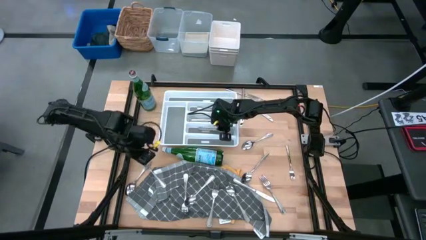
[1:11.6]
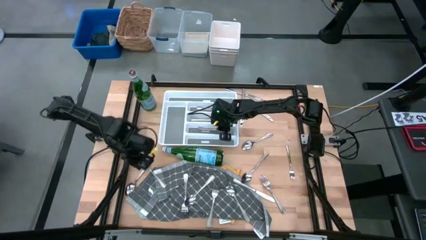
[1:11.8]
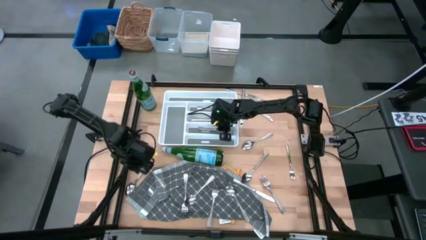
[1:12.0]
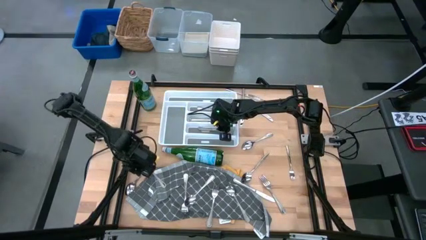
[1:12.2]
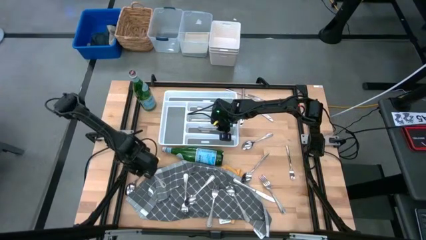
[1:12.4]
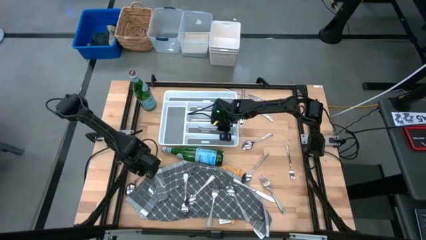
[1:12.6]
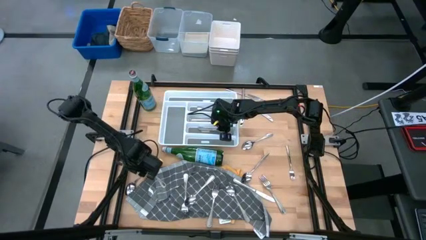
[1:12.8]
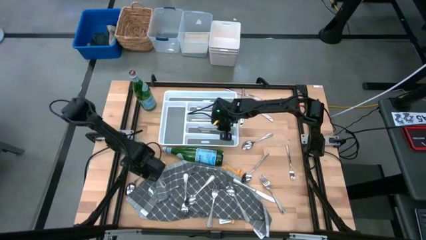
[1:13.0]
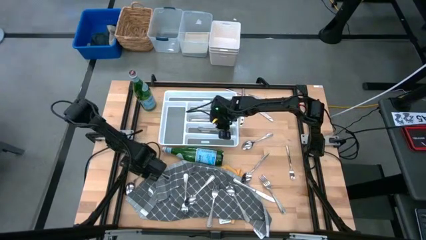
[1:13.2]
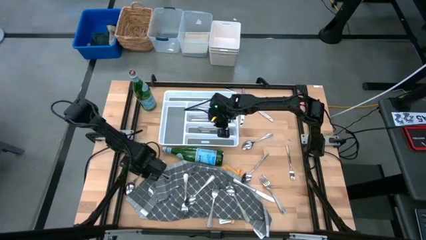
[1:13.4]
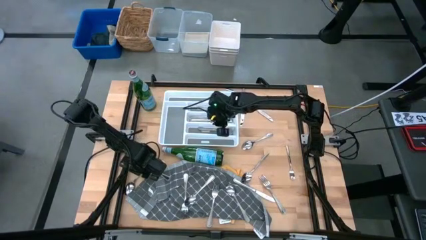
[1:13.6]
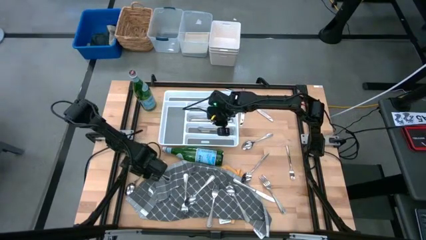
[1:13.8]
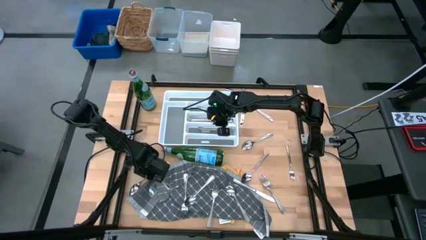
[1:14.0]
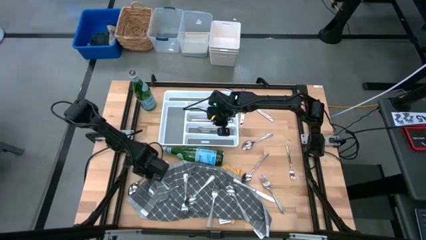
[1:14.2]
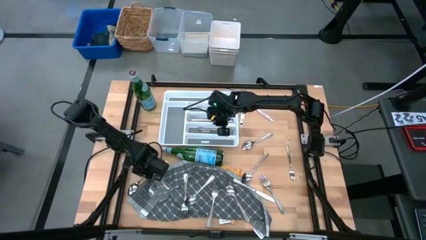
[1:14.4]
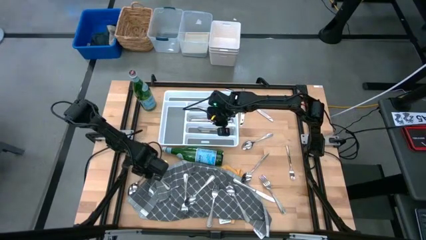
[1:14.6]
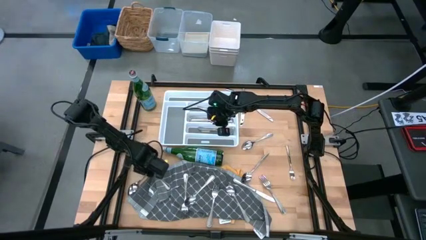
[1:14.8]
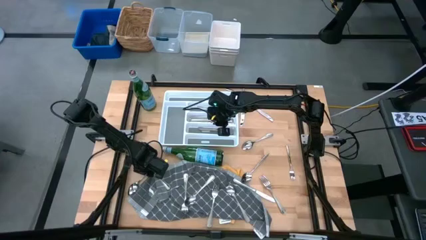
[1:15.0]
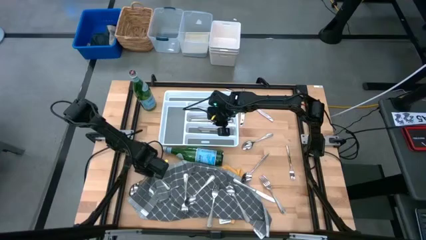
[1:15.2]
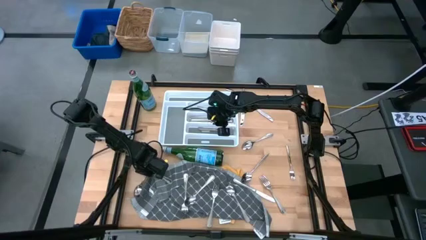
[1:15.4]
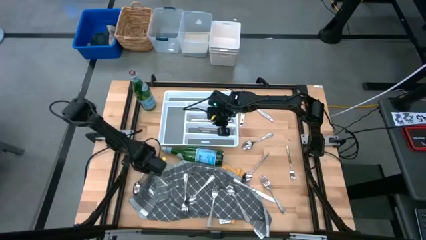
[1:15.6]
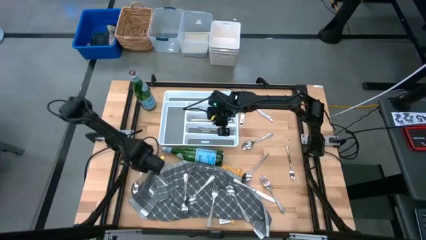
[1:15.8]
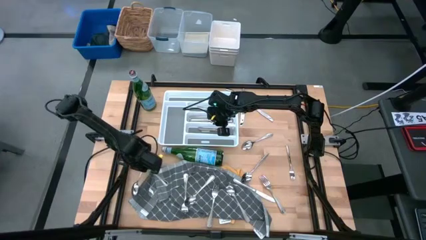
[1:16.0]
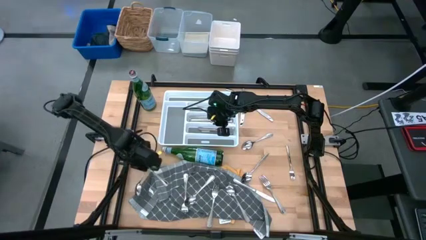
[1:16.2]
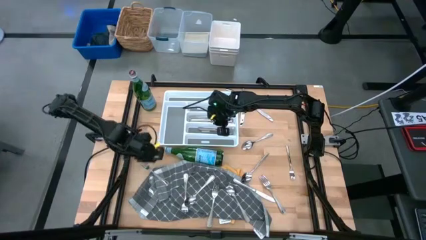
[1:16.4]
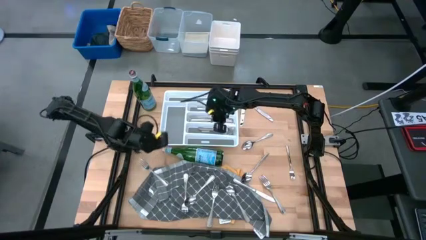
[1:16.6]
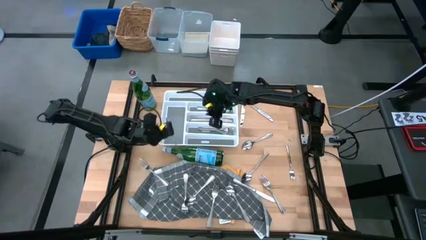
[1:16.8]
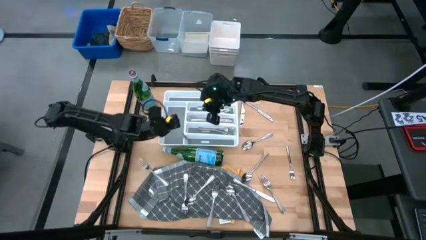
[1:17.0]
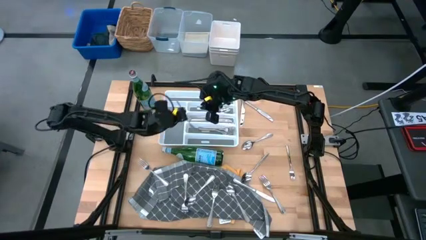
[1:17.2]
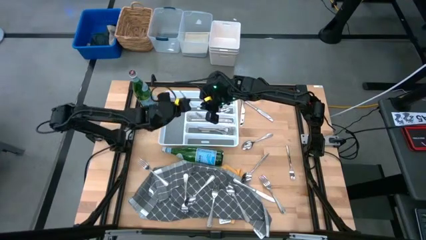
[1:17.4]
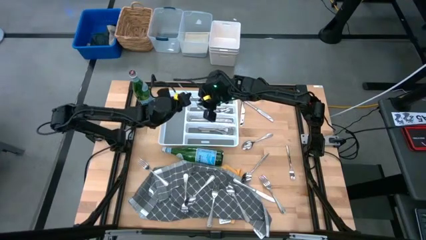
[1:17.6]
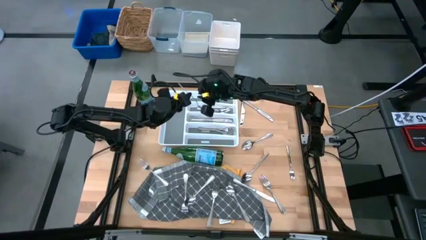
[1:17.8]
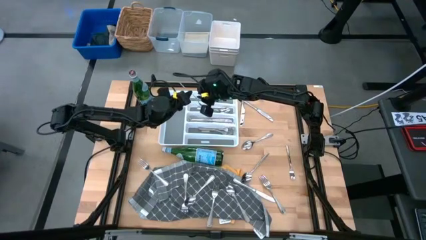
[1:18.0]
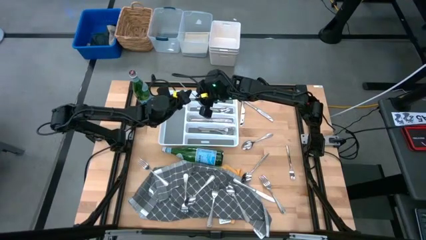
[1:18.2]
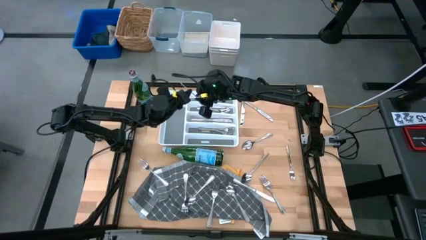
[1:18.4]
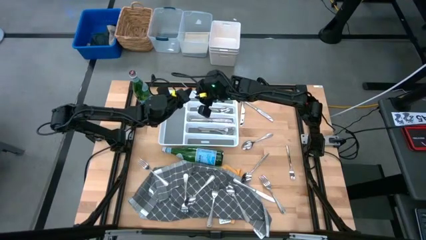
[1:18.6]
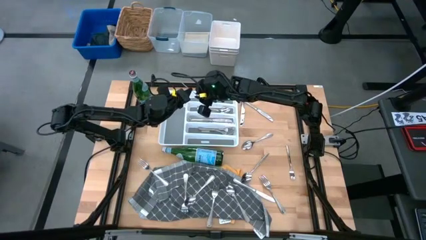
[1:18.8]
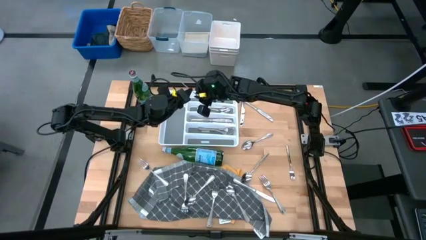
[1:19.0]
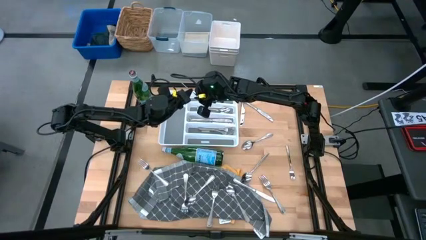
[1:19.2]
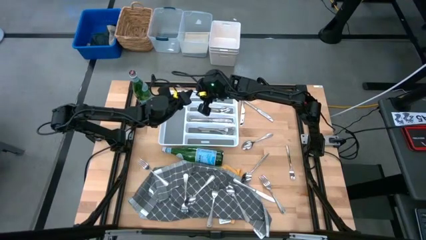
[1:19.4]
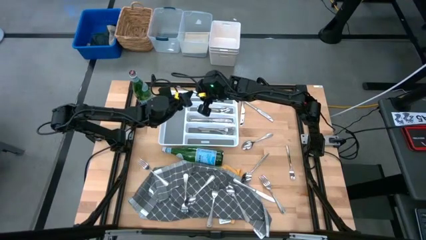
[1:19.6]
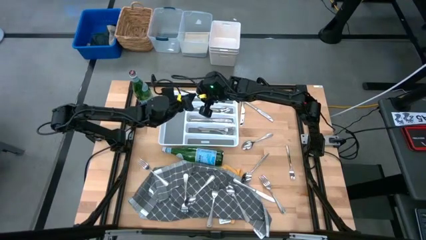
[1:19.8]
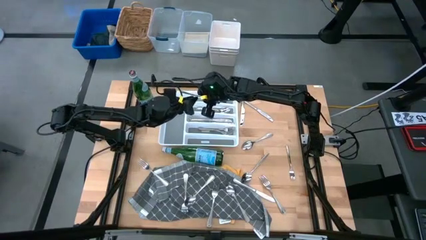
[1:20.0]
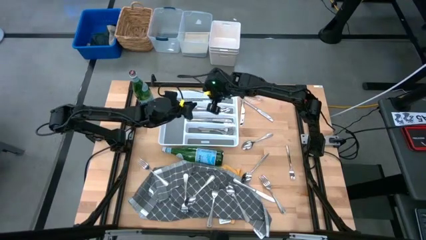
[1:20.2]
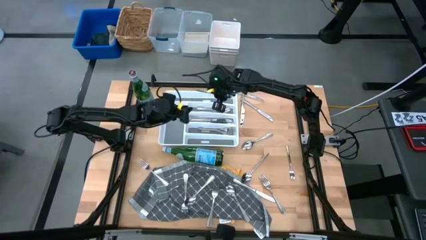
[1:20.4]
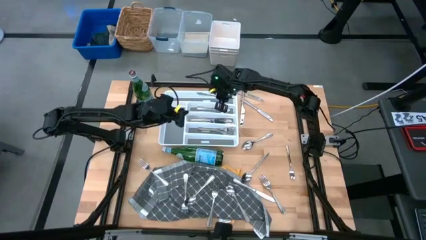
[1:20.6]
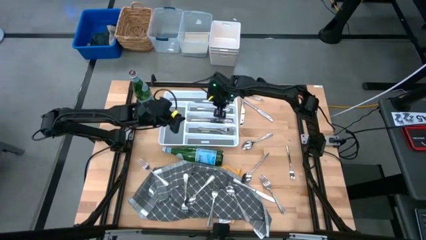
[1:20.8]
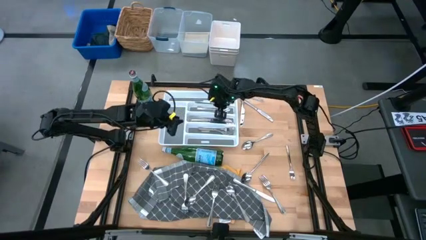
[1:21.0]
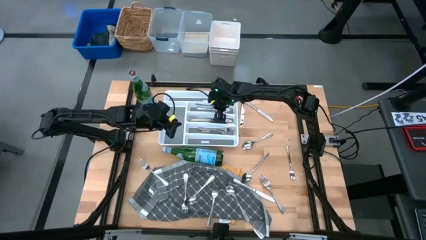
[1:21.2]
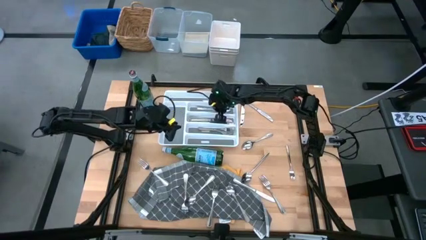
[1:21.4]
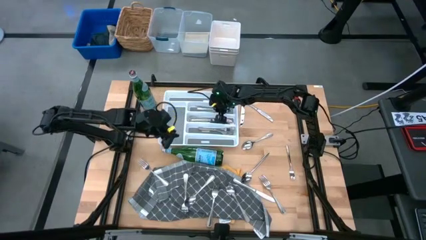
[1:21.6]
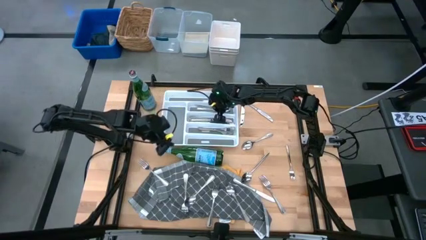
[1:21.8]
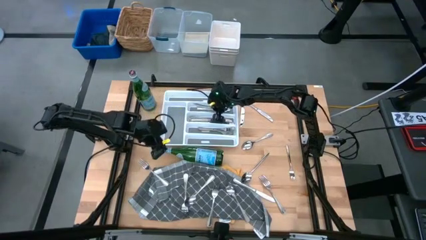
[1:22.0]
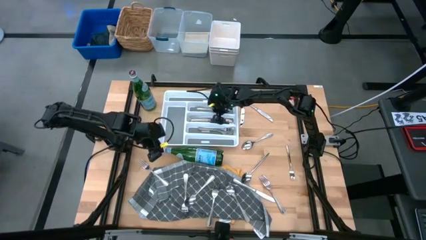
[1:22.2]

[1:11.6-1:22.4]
Task: Sort silverware
Put the silver spoon into the silverware tray

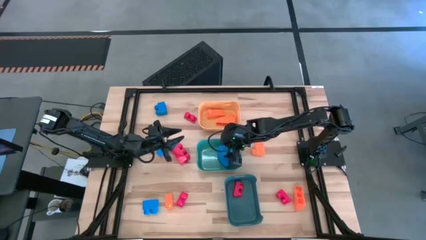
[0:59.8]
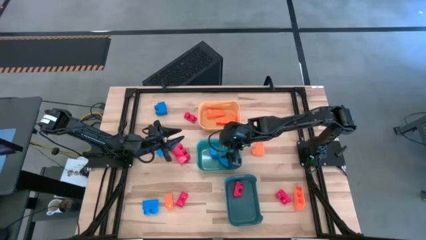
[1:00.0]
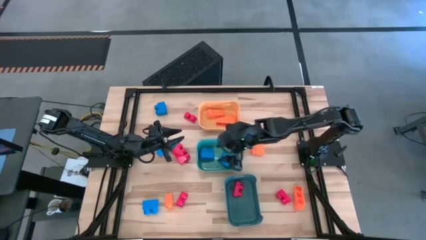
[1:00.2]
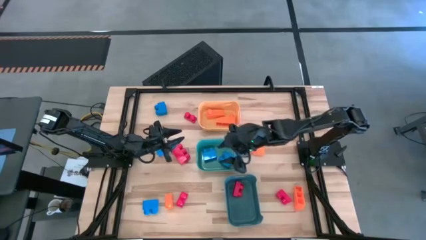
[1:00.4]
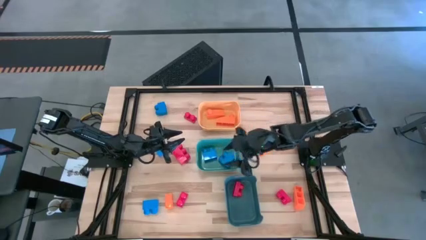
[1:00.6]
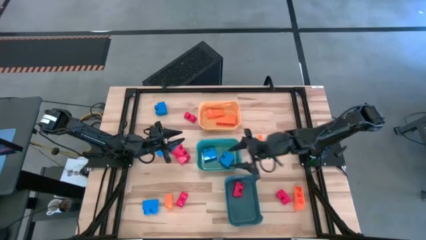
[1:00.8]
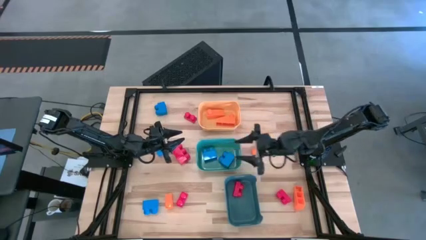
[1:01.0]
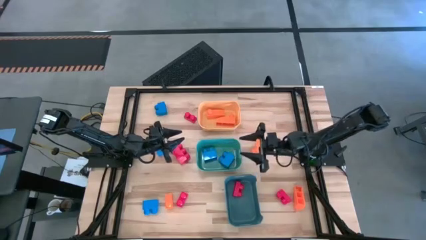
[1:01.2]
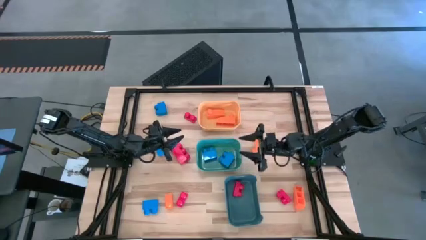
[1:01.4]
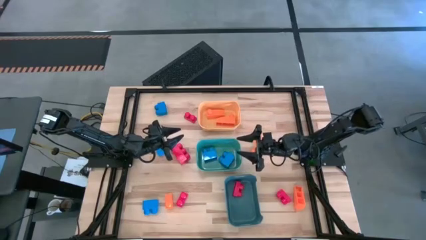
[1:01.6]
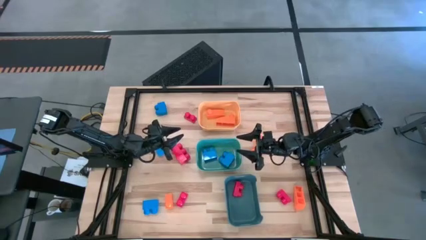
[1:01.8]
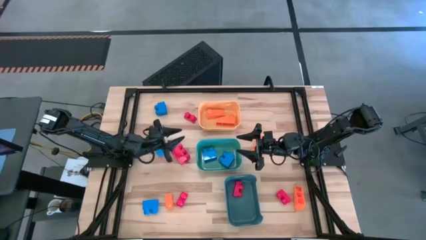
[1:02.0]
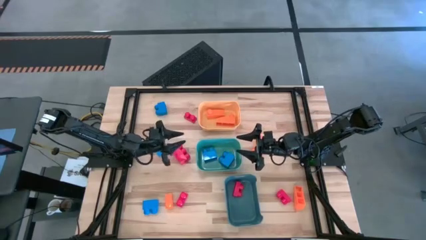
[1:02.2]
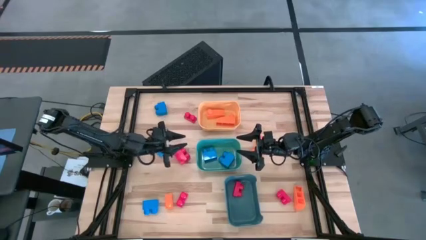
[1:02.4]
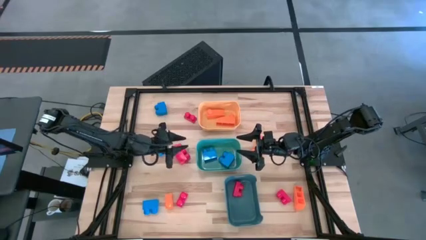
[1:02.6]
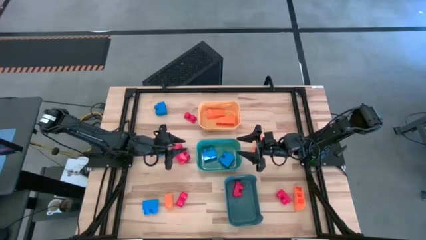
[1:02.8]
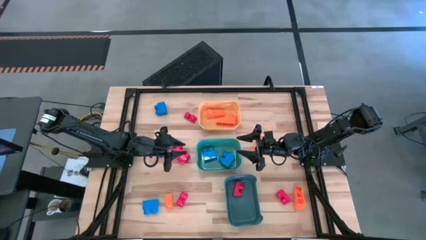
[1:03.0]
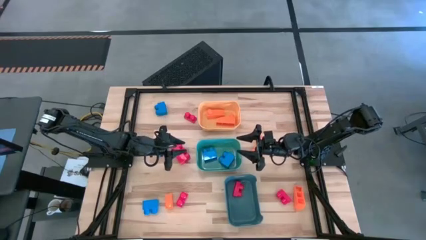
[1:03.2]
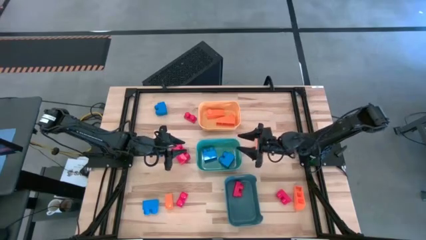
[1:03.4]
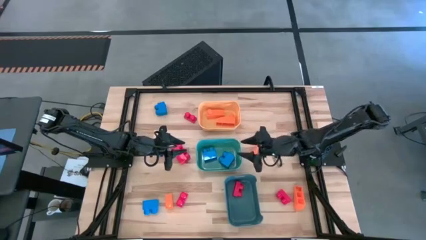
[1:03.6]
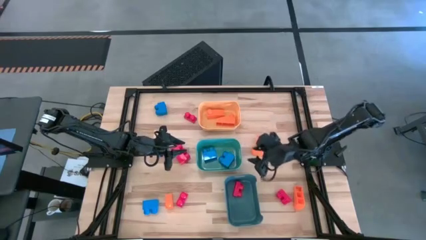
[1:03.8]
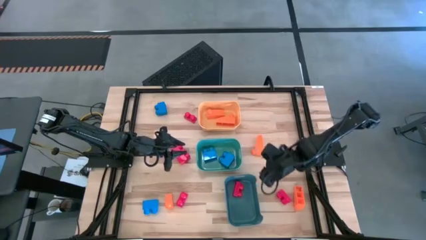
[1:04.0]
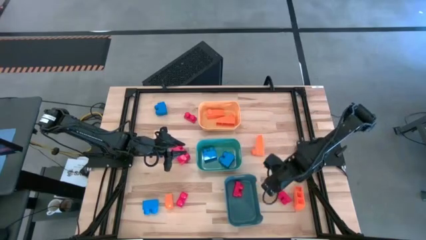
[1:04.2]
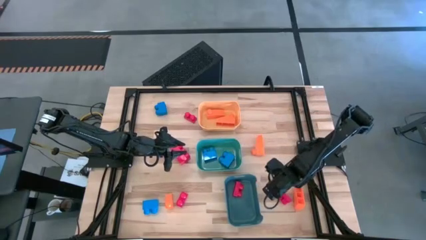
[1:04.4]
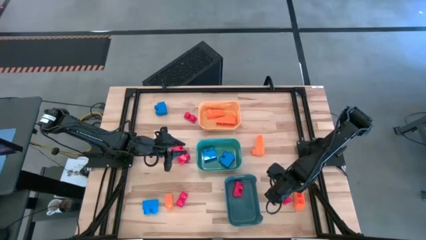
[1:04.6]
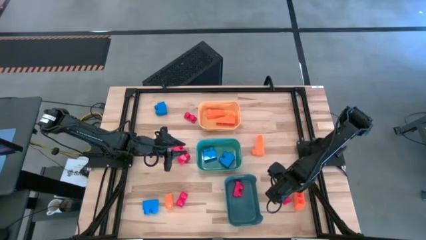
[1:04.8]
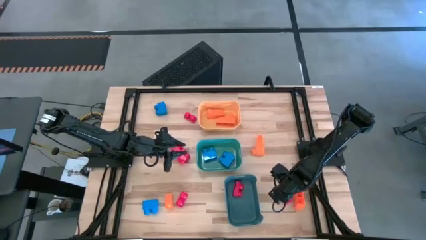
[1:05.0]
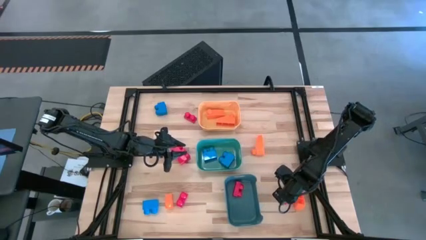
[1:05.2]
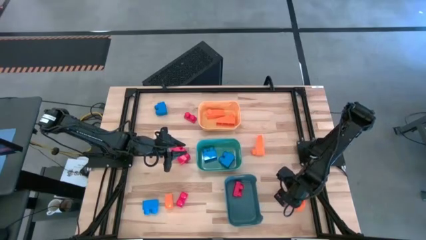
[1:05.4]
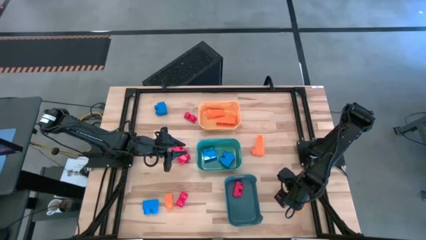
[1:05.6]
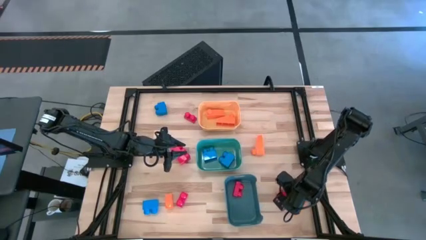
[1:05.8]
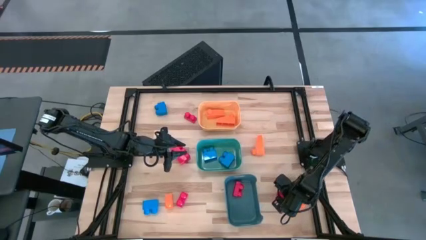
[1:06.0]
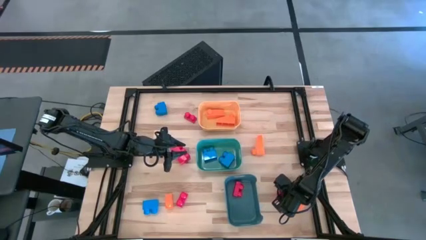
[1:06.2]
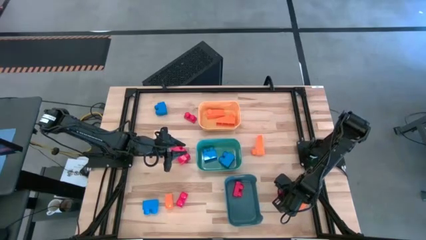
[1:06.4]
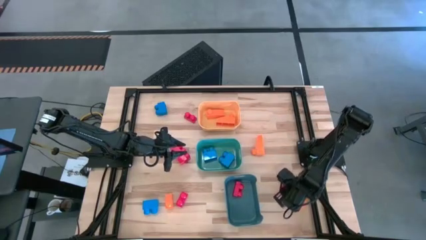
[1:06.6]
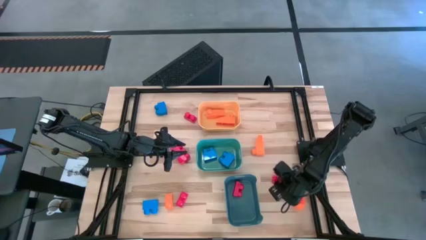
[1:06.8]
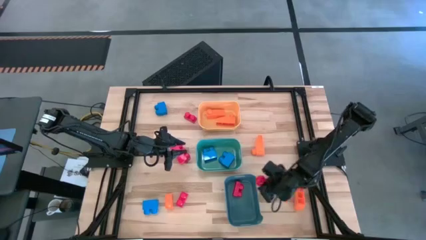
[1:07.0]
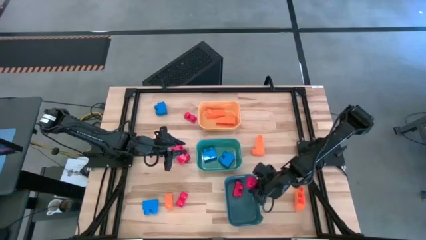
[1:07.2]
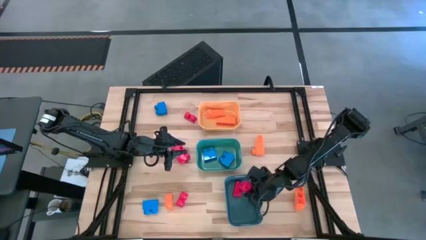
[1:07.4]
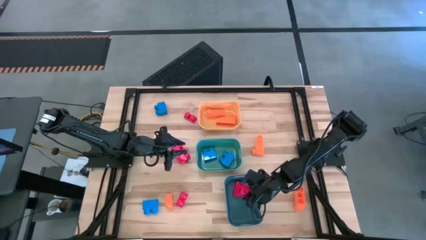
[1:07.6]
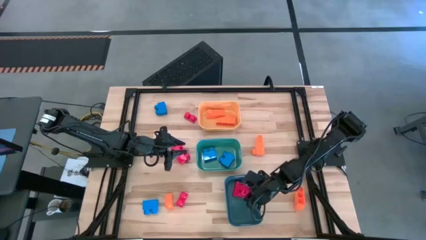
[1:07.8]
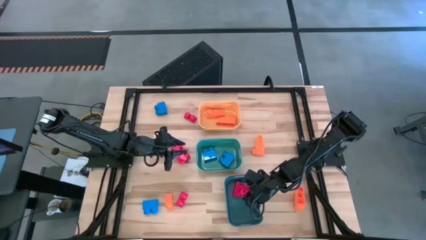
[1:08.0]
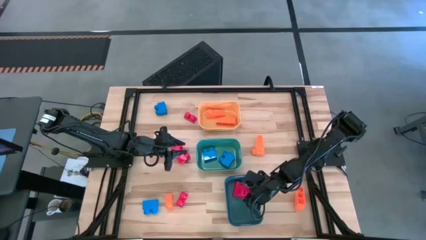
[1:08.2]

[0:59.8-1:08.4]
Task: Sort & place blocks by color
Put the red game piece into the blue bin
